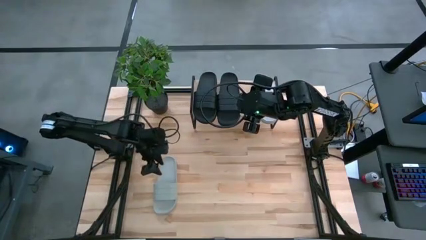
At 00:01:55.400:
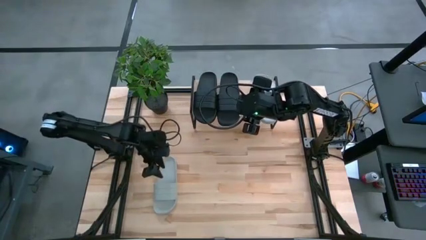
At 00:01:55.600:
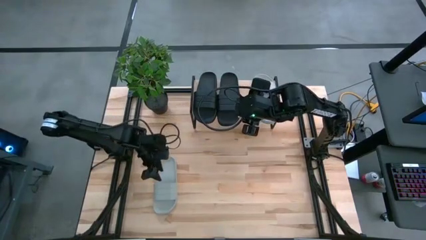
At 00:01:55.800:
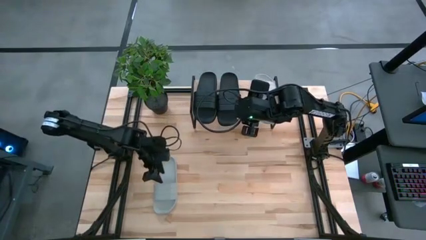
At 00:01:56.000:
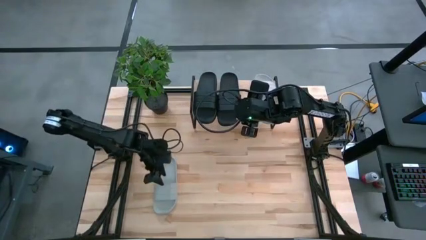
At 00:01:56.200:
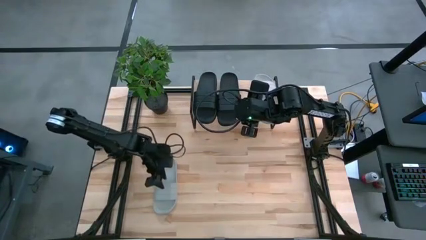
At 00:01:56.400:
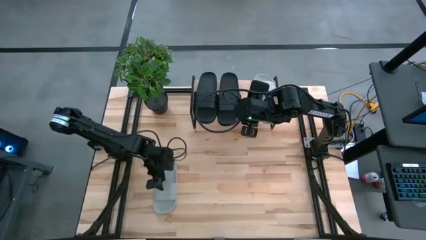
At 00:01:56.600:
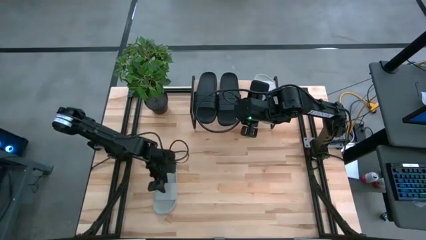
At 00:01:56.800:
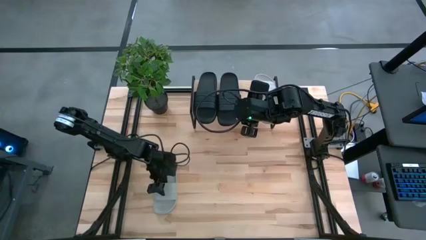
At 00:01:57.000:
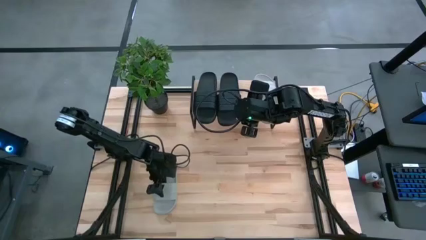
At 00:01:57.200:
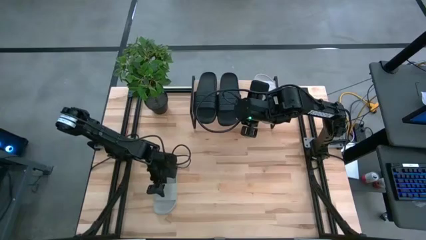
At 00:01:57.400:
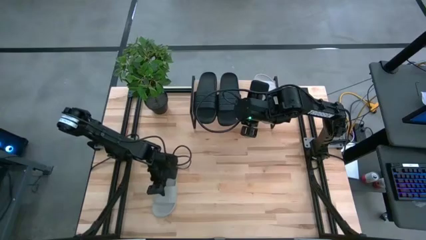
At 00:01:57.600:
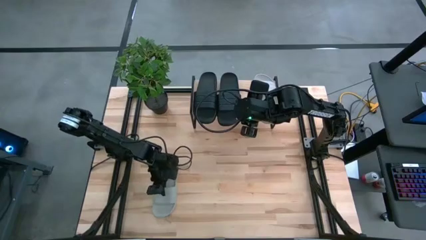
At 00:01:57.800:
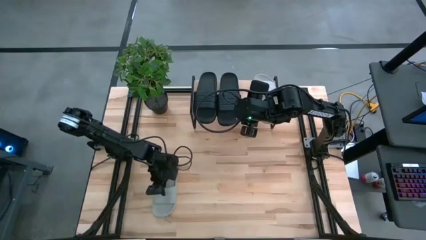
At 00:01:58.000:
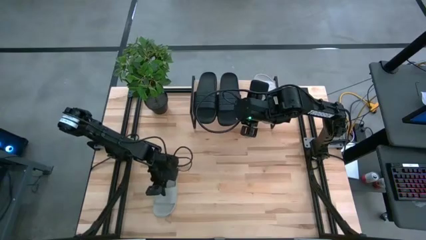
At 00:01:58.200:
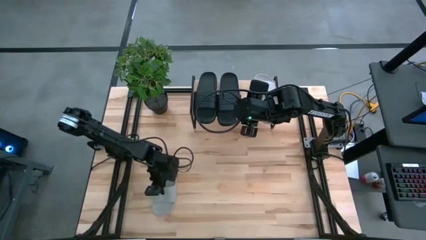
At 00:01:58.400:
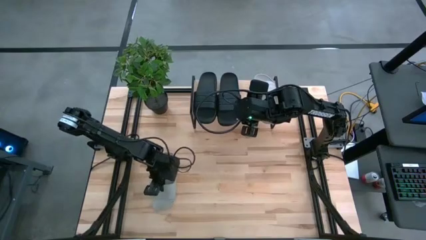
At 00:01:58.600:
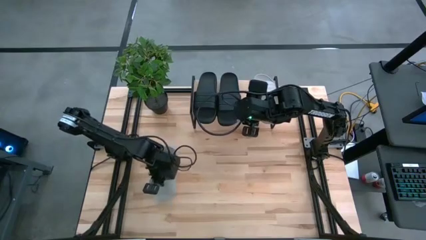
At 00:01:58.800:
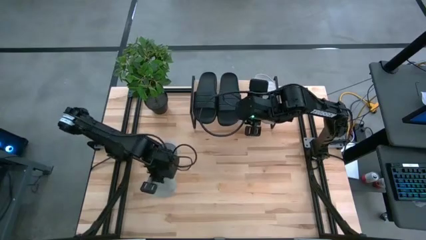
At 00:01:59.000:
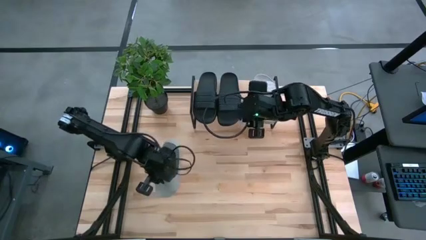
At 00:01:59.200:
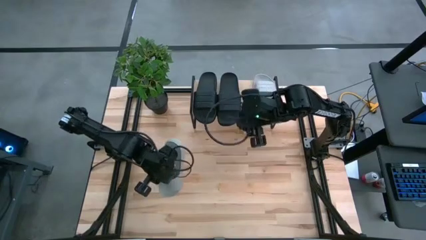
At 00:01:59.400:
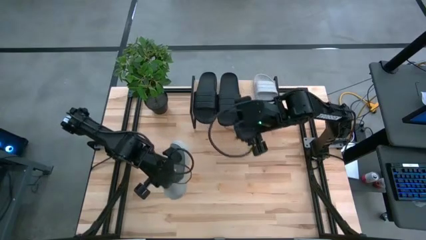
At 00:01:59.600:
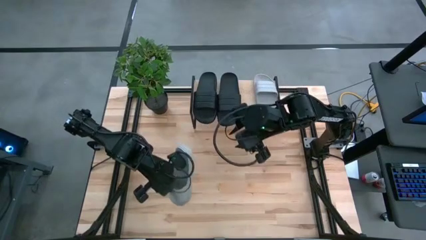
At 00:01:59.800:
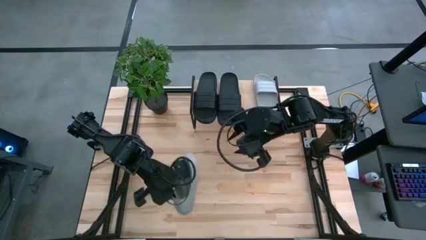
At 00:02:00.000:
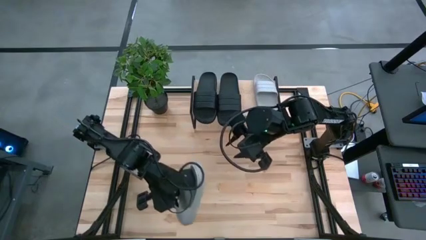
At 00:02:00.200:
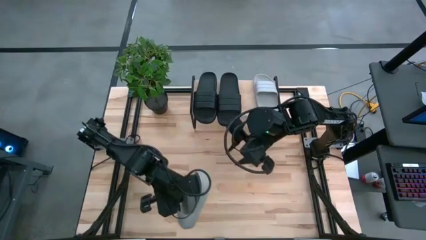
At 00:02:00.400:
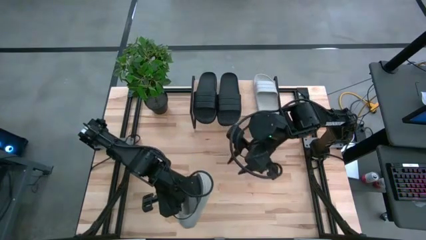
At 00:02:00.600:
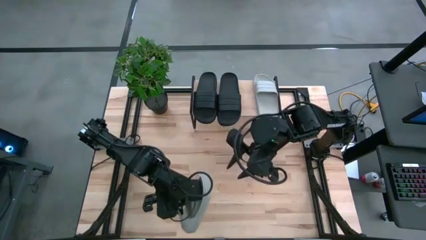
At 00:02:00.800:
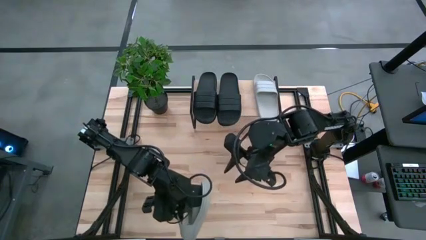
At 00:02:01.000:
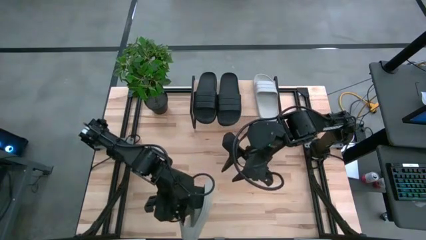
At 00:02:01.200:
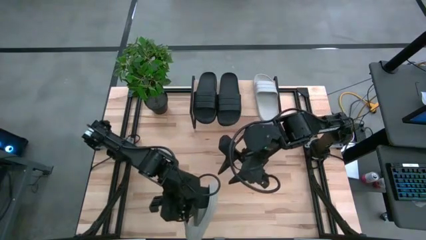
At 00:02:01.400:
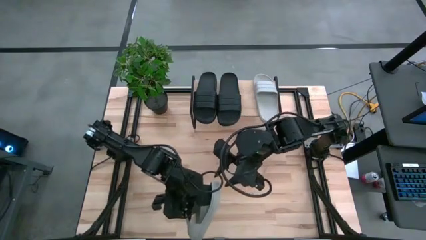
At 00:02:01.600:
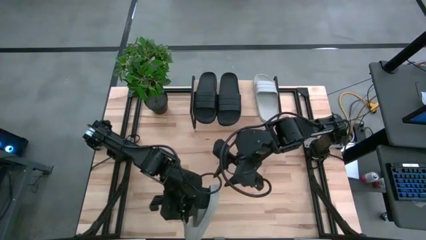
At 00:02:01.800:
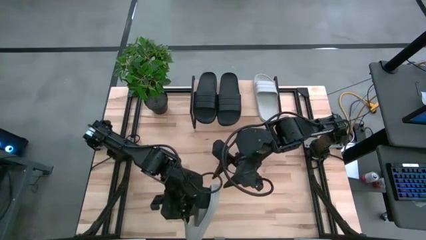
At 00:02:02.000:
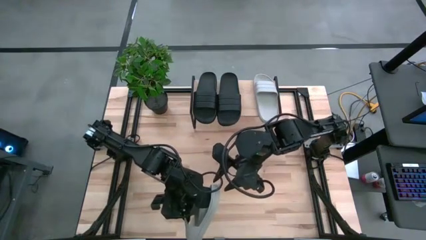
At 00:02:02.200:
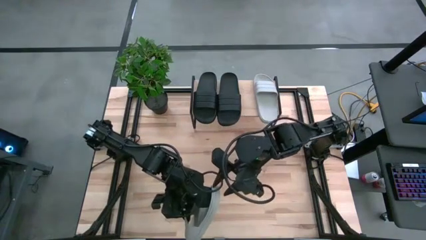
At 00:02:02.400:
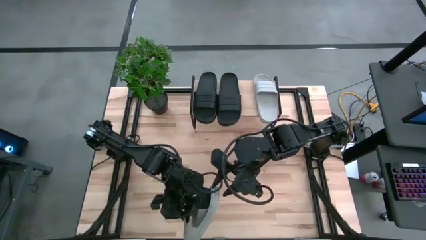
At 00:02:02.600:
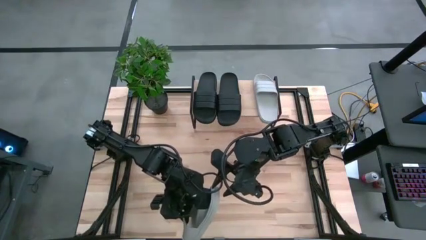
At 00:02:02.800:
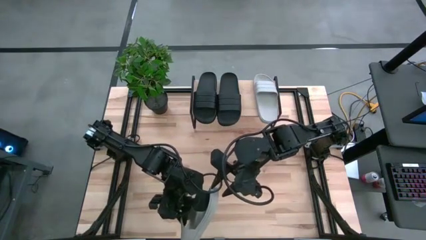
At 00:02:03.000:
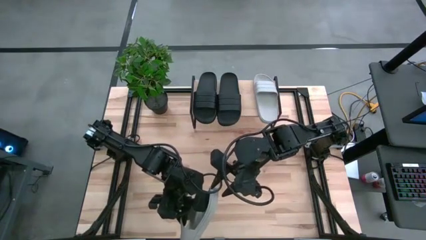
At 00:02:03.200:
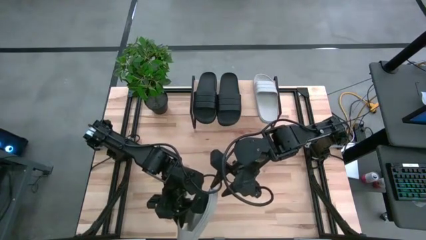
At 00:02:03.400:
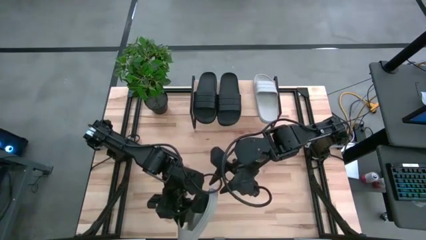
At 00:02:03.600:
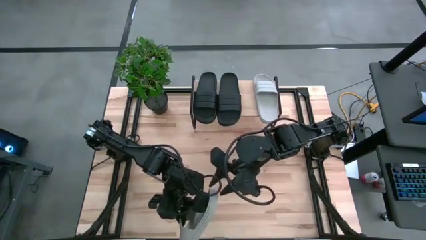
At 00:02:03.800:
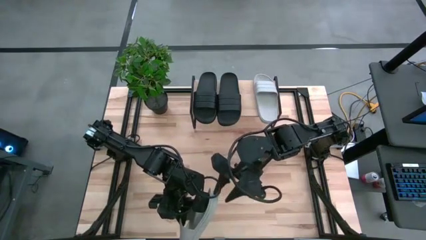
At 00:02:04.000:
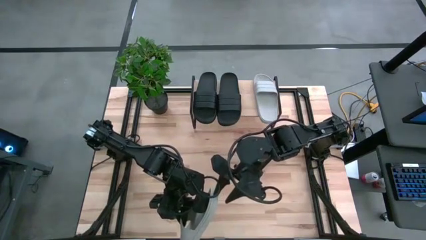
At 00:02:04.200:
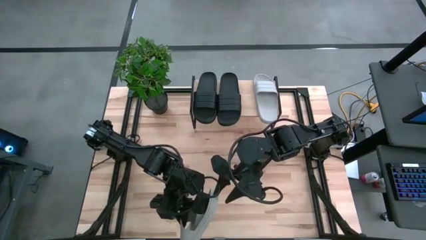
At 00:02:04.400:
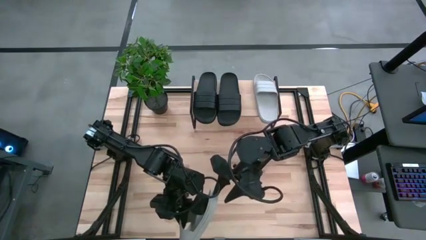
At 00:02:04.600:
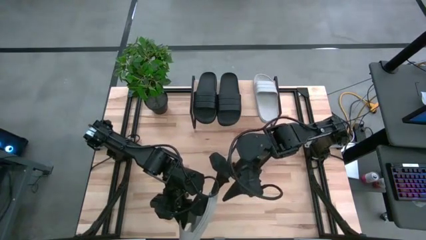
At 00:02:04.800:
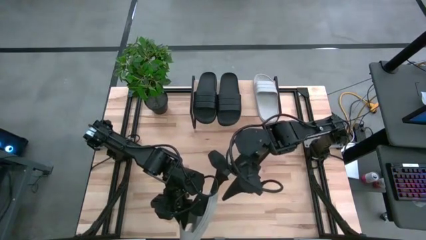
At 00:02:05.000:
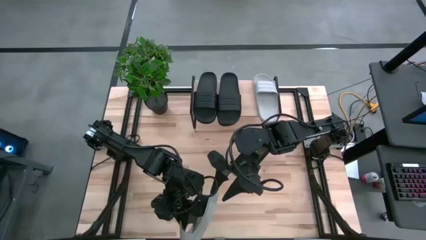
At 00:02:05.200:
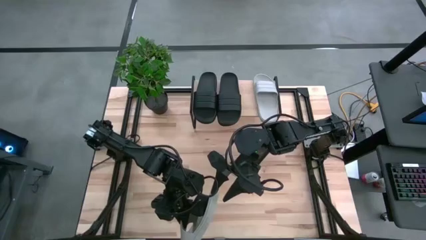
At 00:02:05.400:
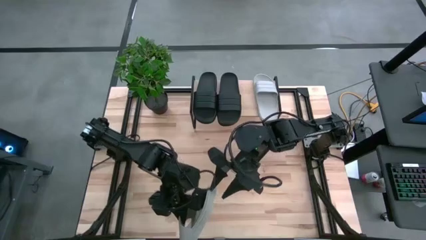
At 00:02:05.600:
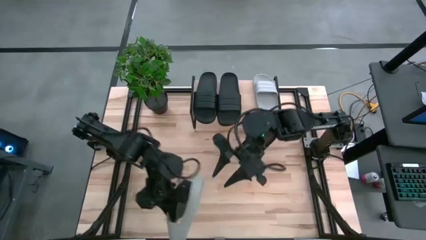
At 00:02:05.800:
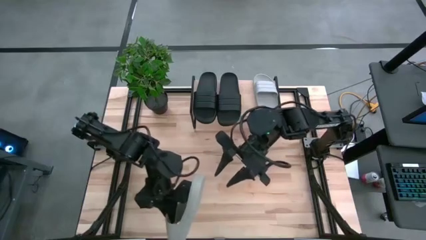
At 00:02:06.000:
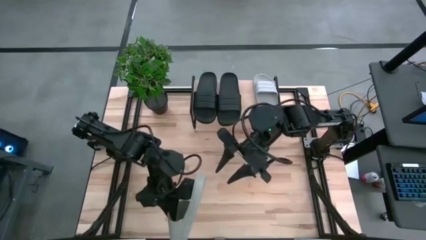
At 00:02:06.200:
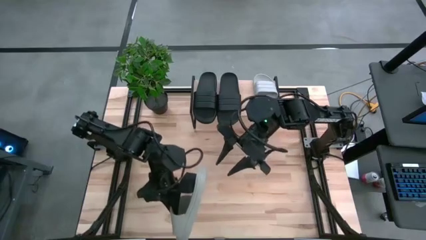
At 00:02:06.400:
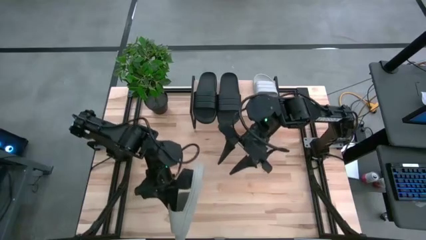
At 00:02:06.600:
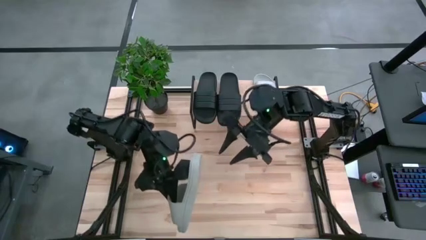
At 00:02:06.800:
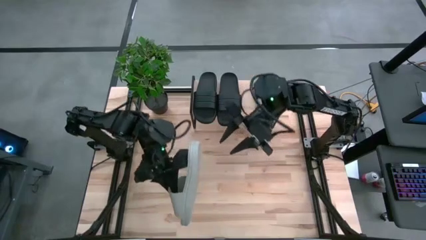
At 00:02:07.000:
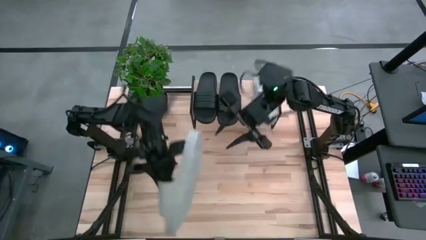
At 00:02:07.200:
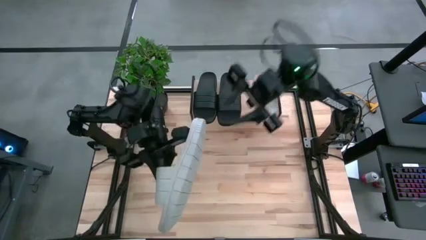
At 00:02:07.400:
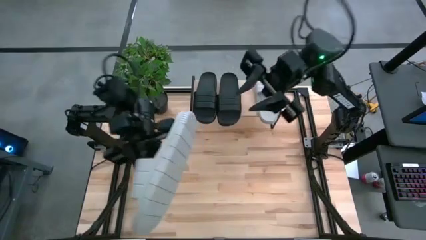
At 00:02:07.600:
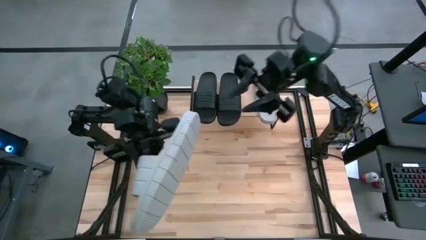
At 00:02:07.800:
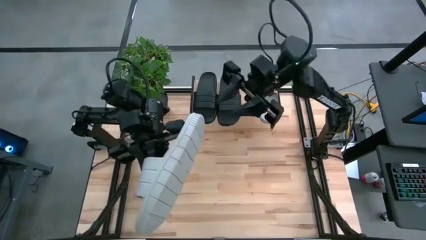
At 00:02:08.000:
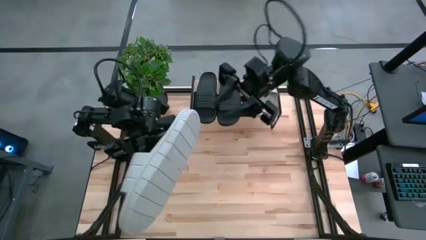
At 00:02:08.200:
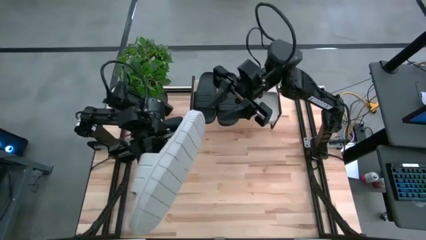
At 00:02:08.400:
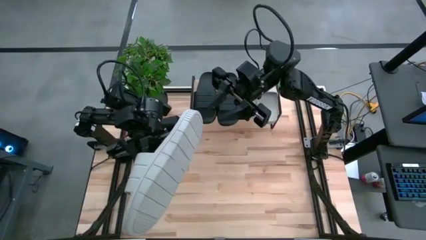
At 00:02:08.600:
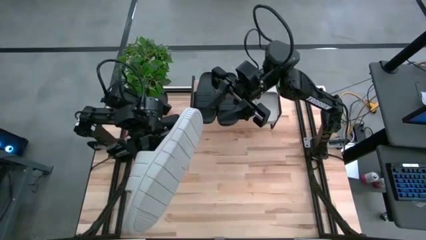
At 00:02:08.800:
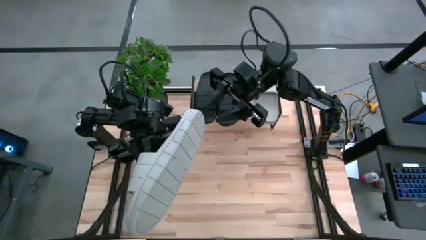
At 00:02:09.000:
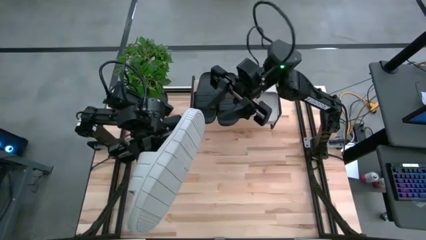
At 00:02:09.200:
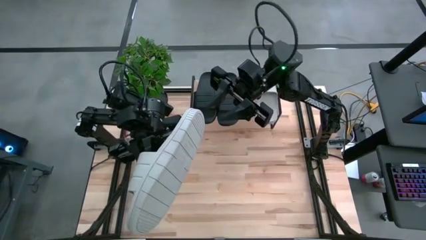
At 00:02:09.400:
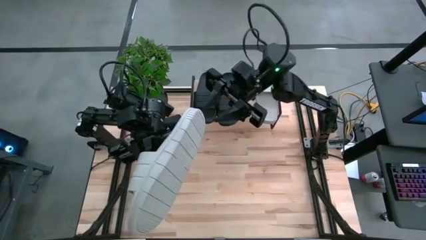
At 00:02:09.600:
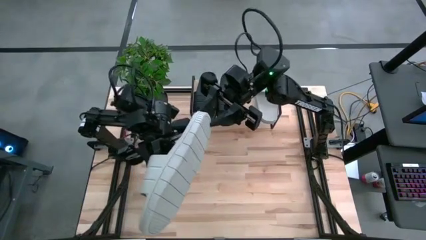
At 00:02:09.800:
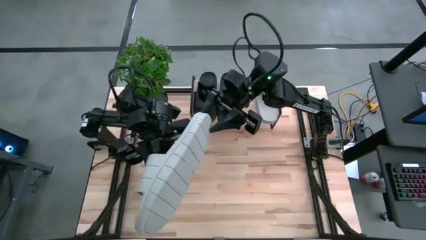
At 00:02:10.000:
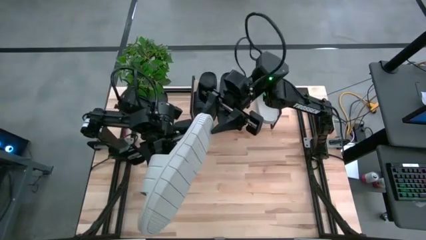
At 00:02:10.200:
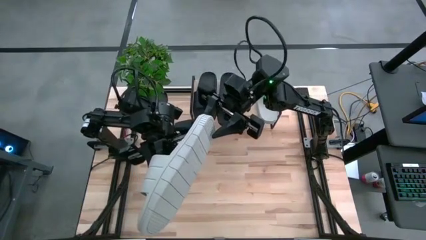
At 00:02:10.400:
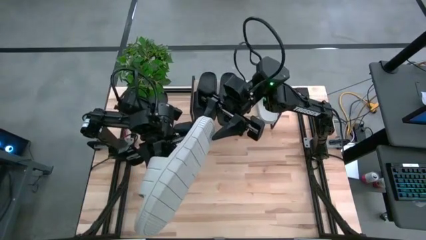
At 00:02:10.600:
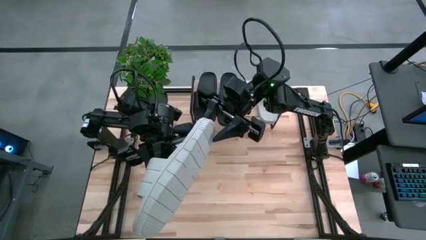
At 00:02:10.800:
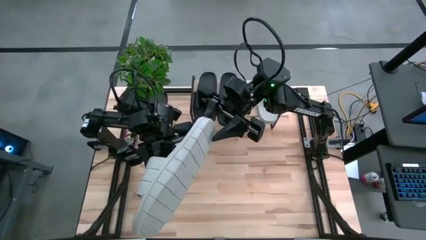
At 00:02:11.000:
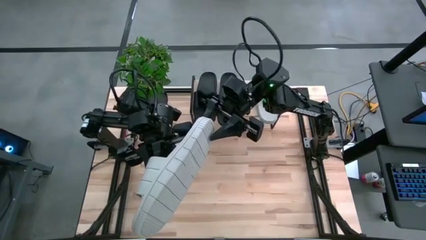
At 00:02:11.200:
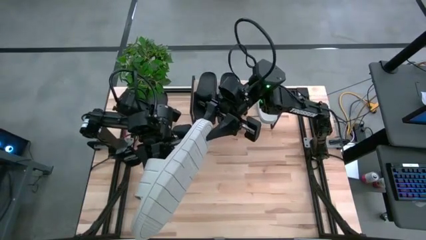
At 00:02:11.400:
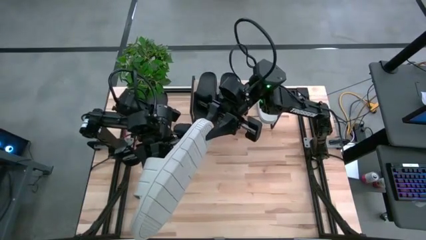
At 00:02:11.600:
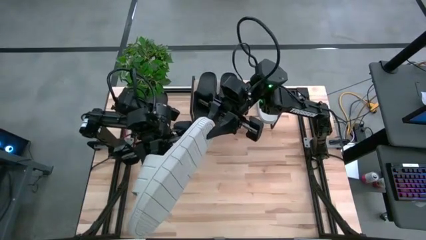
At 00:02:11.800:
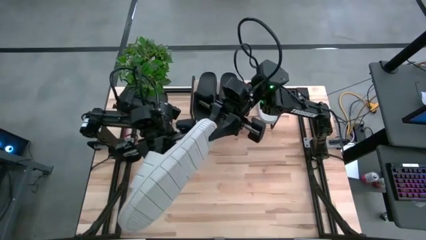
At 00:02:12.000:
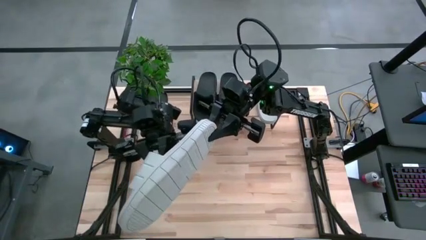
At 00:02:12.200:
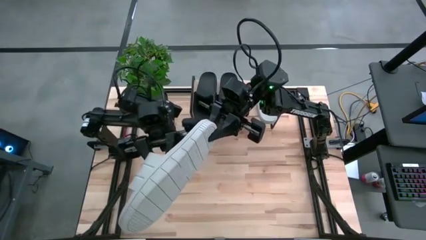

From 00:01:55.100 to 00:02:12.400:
Task: Pick and place slides into the shelf
Put the gray slide on the shelf
